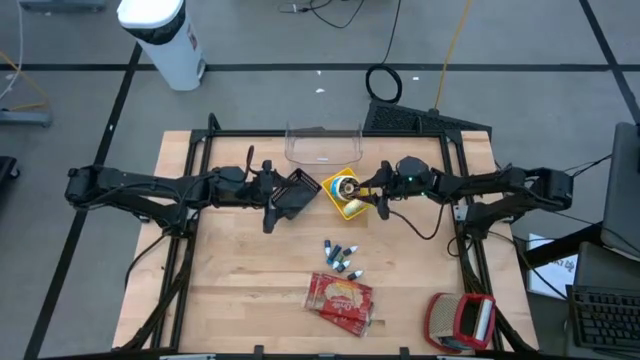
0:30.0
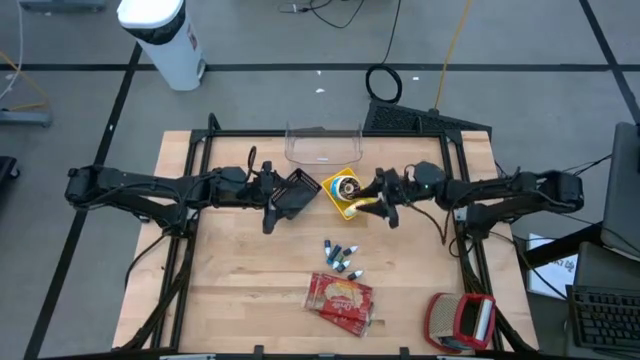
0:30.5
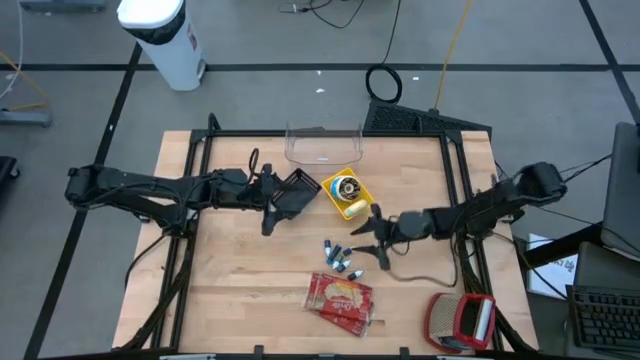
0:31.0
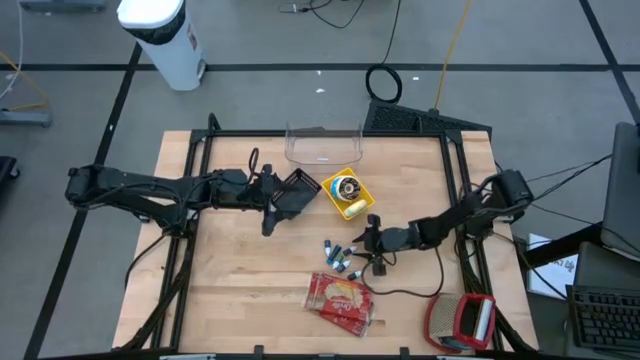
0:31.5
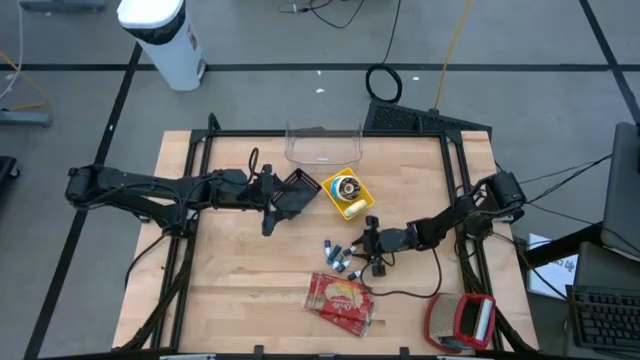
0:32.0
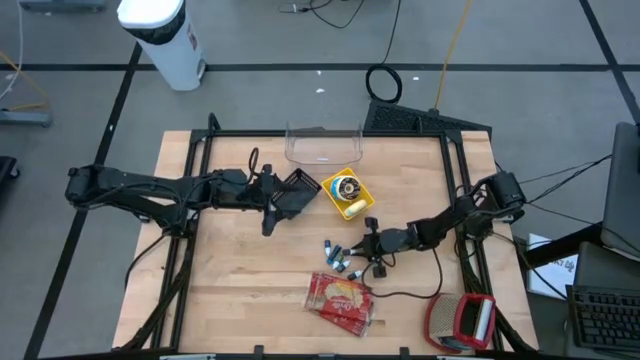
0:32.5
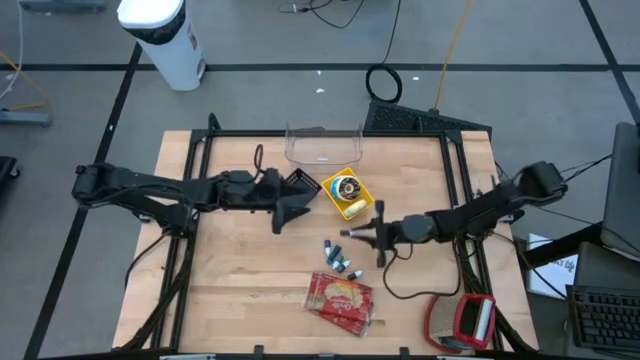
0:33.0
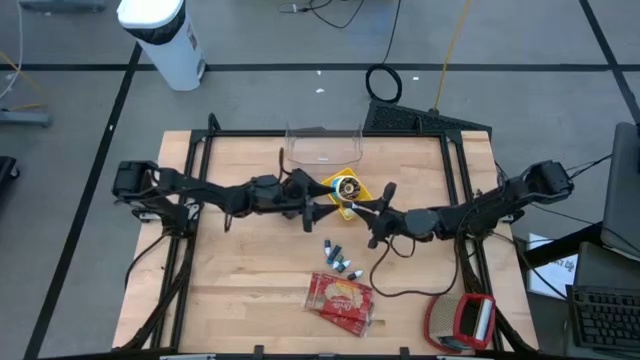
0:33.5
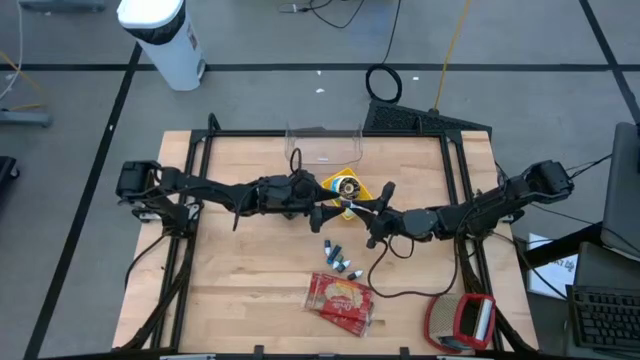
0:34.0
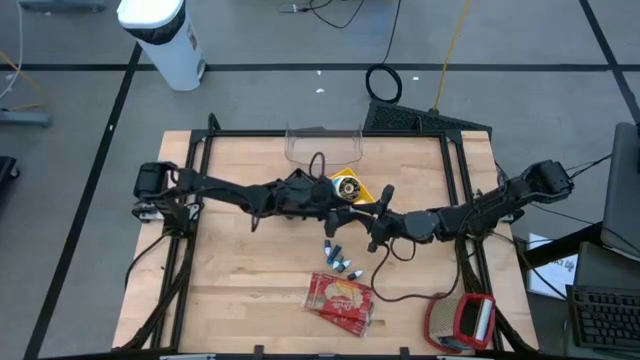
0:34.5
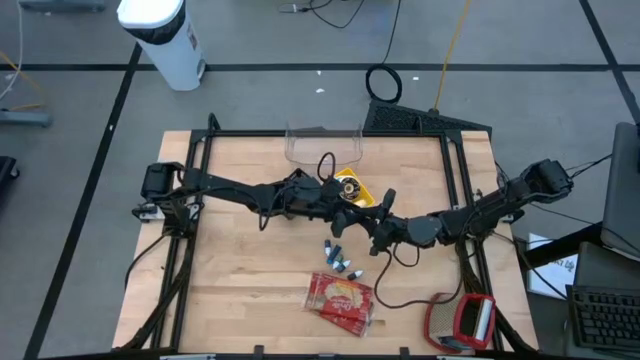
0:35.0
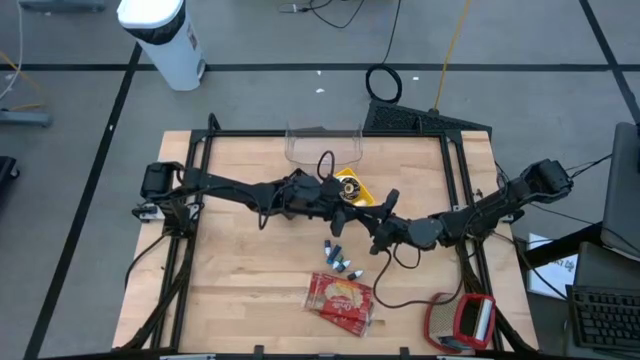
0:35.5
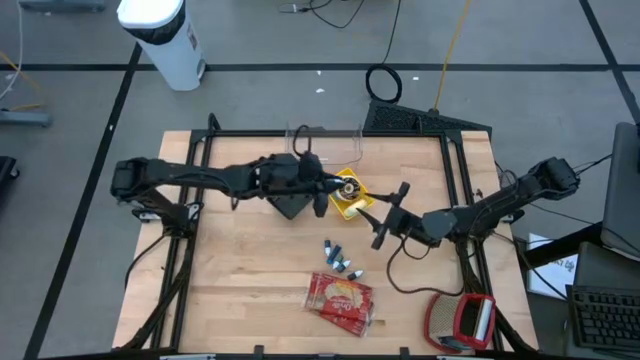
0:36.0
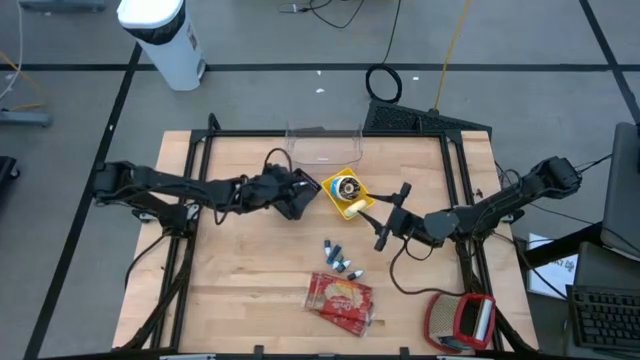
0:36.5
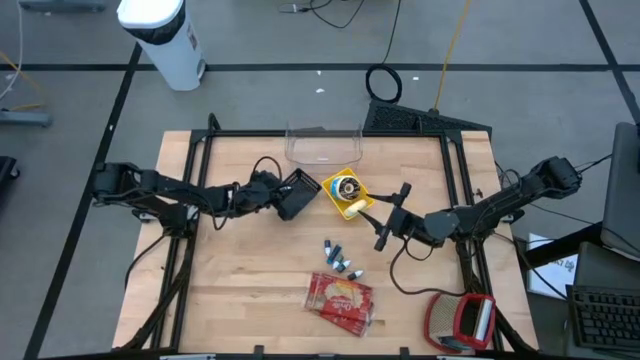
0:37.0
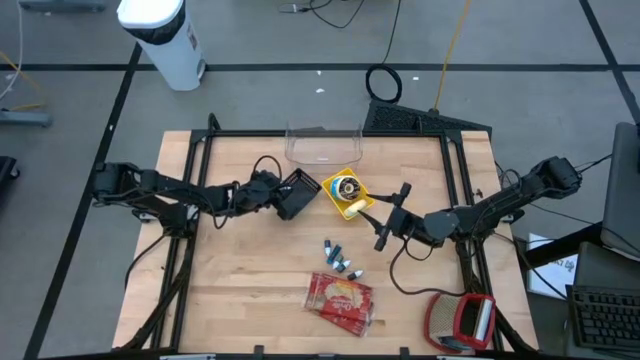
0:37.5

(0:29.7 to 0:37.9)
Put the purple bottle into the black bin

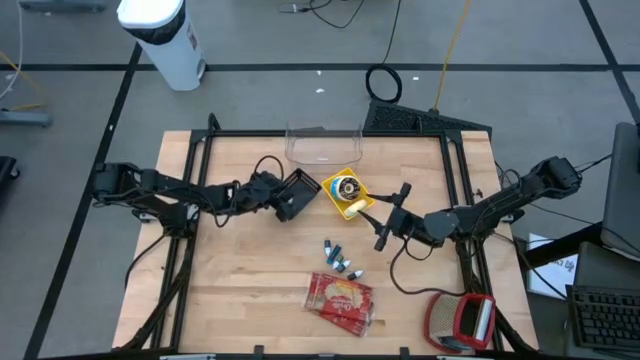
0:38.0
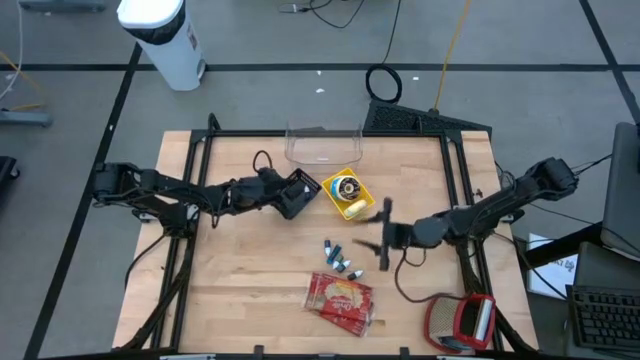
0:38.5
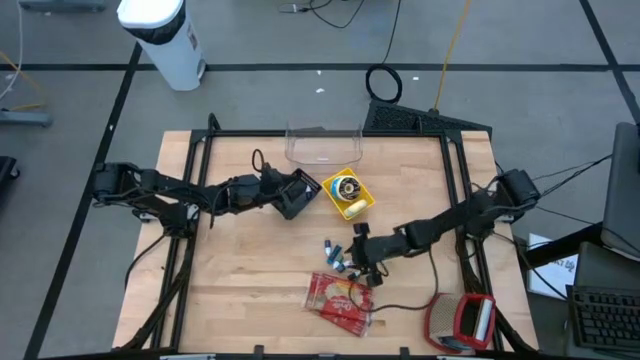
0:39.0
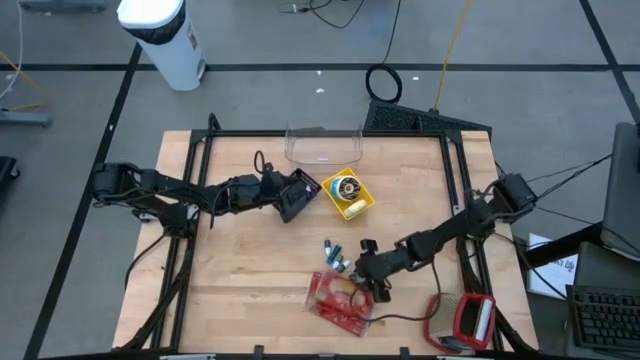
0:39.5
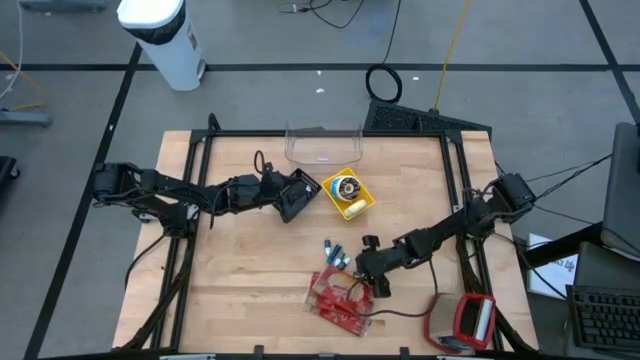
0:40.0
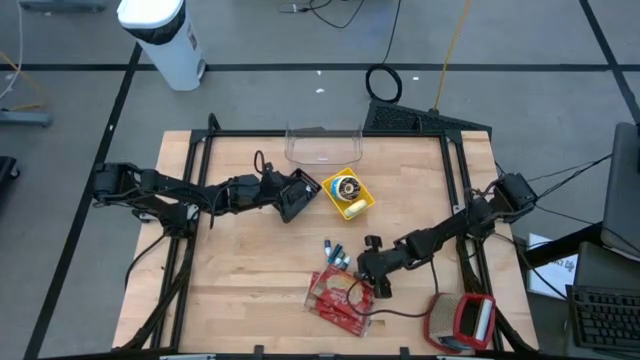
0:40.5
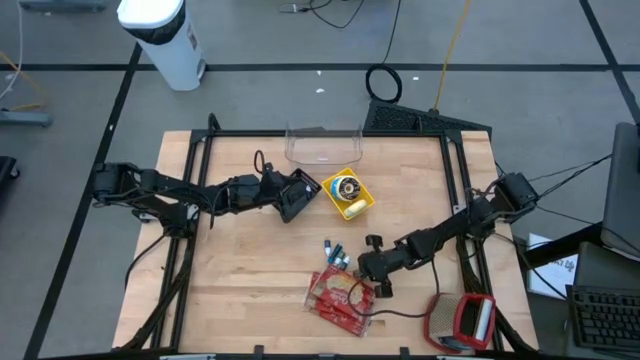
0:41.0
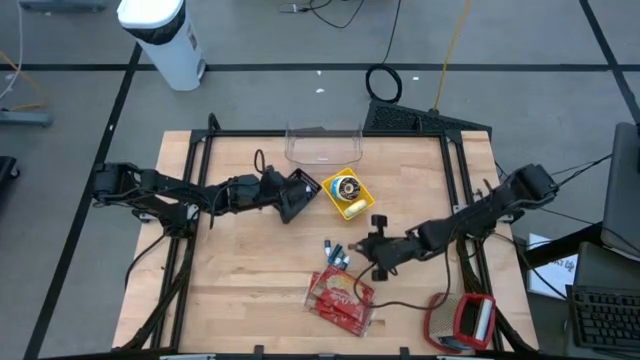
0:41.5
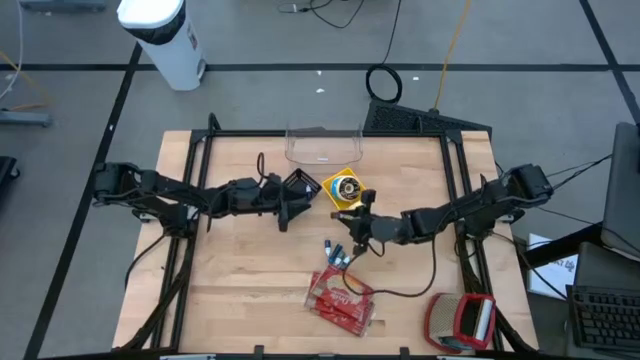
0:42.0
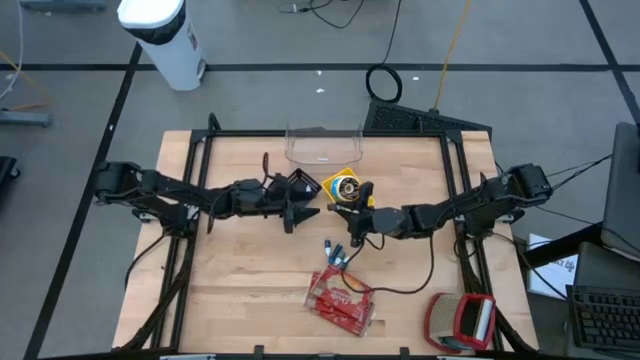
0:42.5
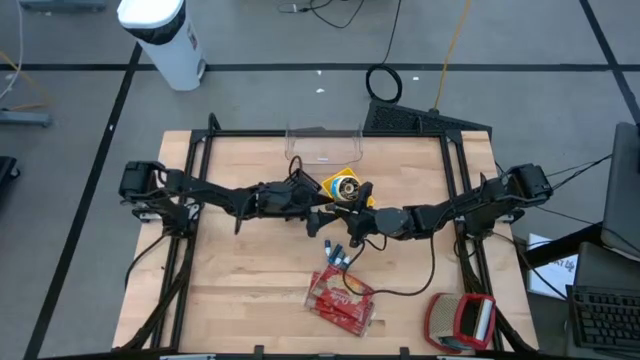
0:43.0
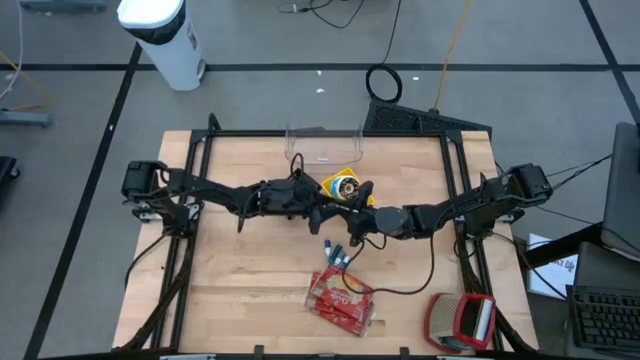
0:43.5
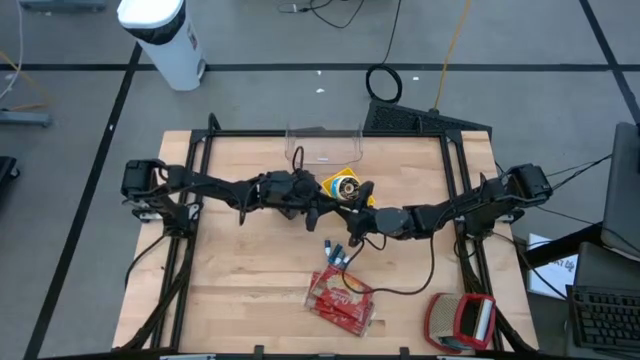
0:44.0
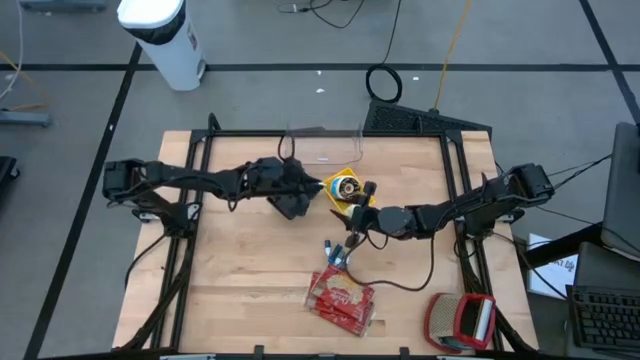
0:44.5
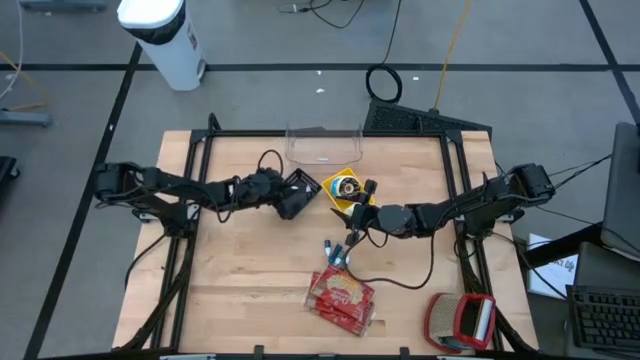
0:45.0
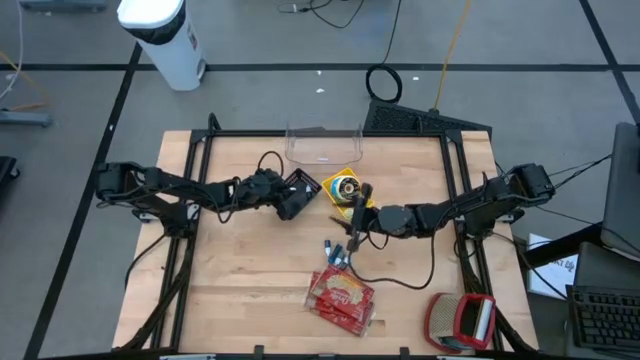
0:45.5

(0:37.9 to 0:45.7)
Put the brown bottle into the black bin

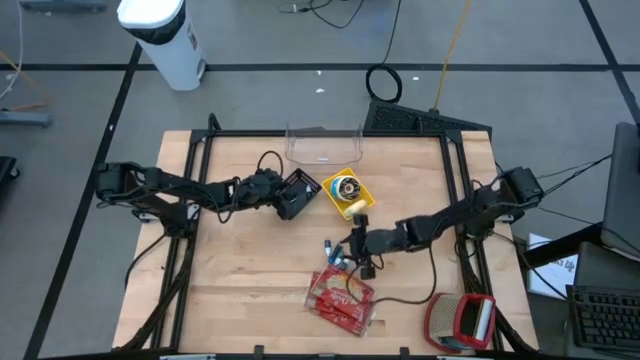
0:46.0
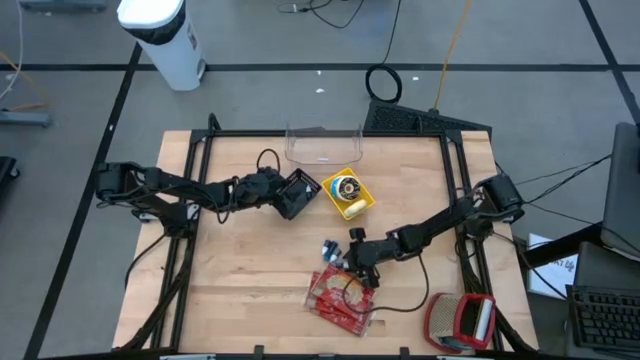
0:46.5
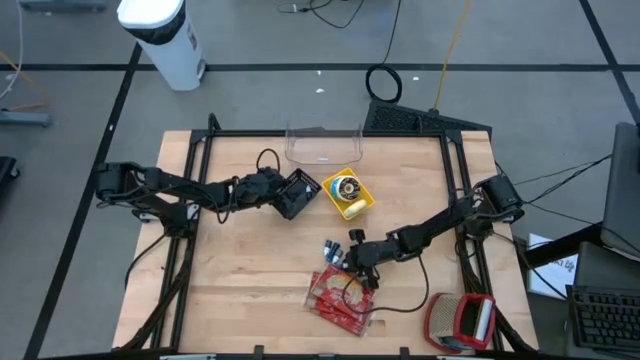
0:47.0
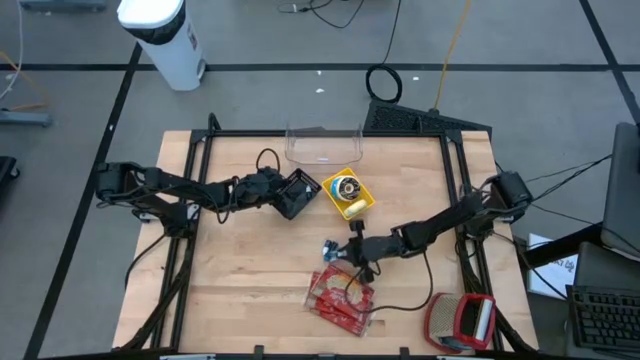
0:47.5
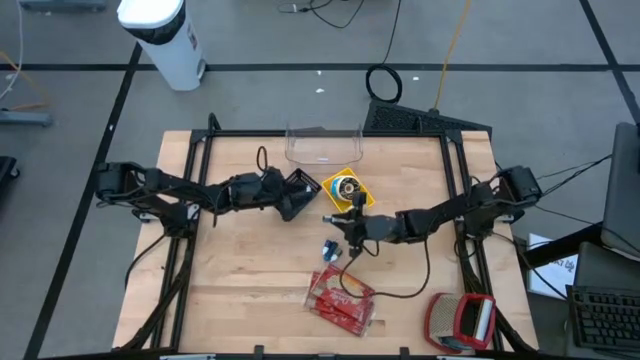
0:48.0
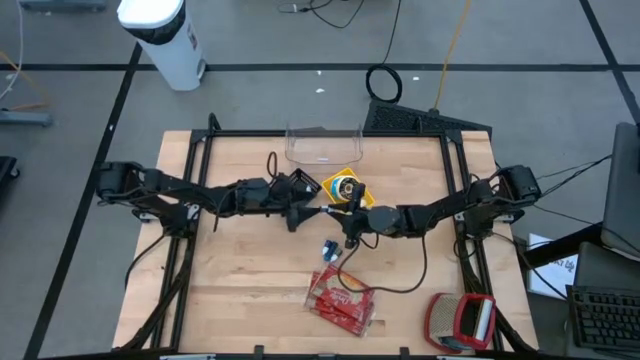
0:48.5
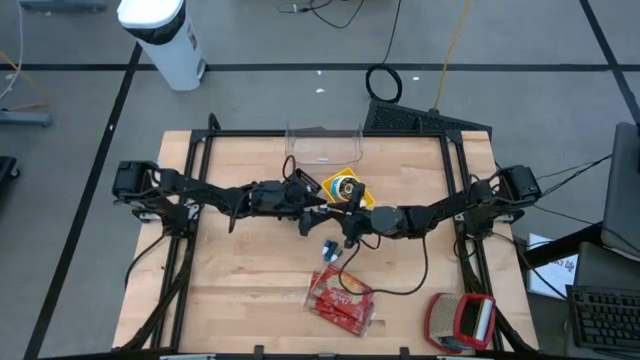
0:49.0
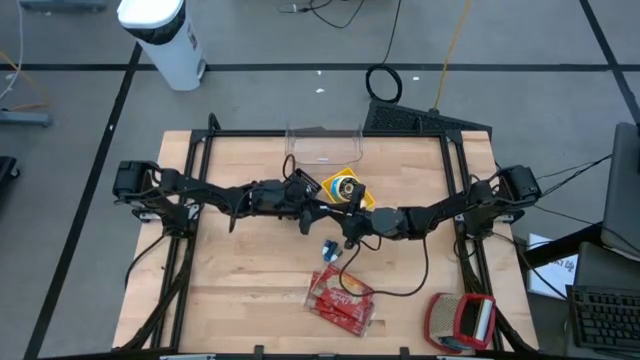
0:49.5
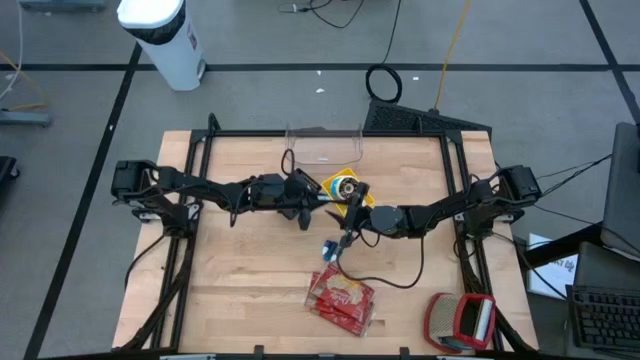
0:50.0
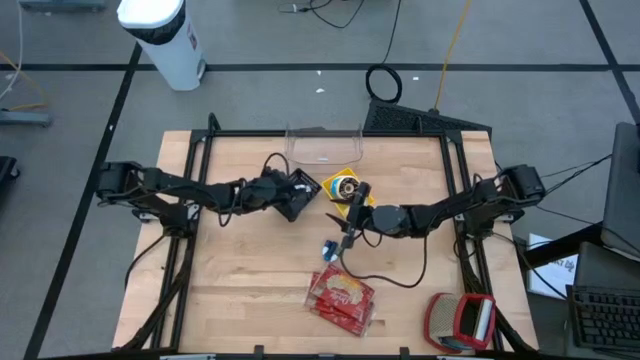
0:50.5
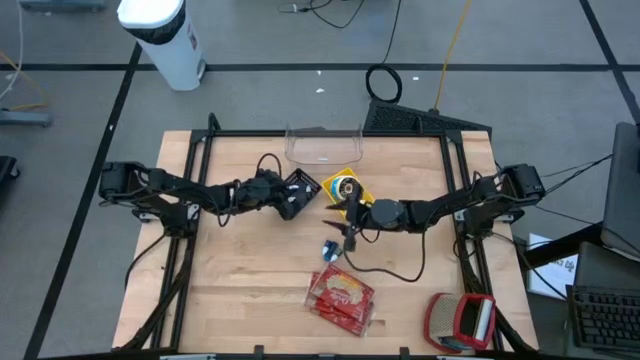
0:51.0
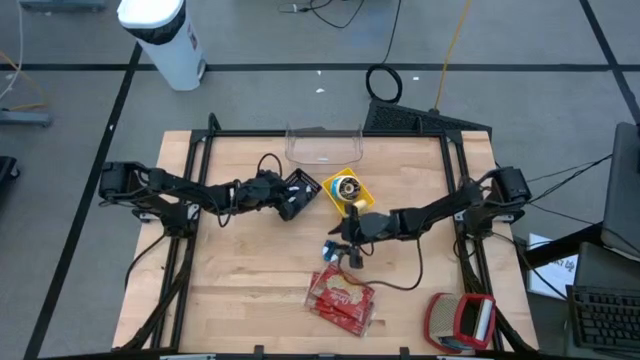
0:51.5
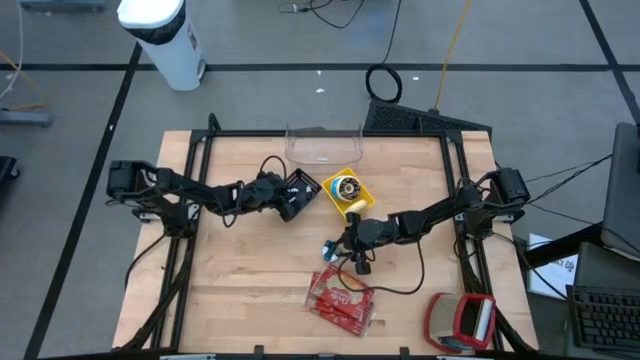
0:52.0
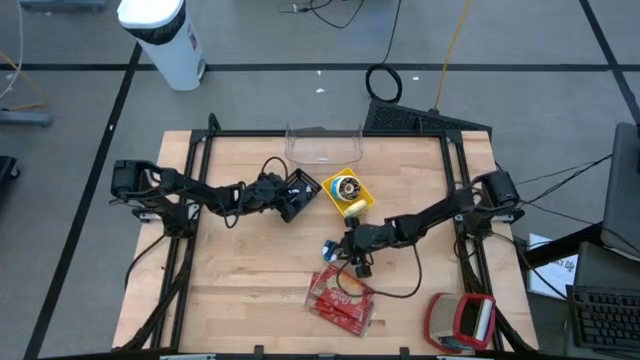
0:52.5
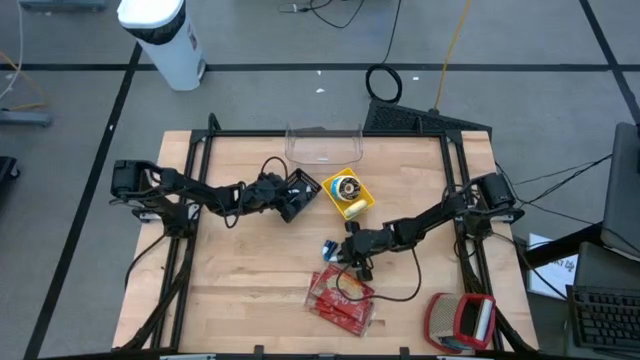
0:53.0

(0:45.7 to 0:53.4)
Put the right green bottle into the black bin
